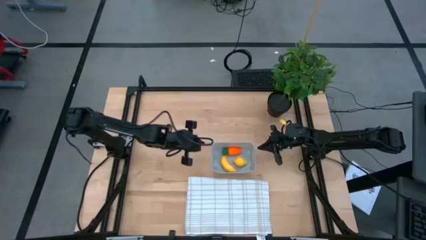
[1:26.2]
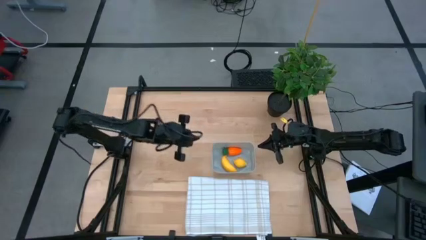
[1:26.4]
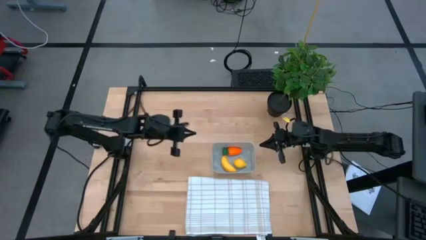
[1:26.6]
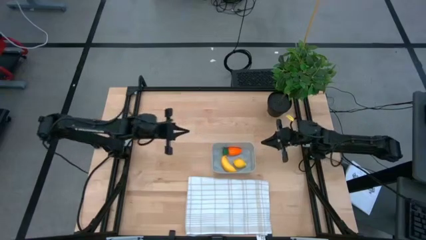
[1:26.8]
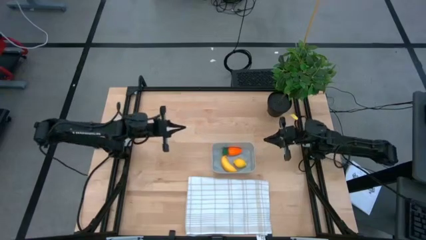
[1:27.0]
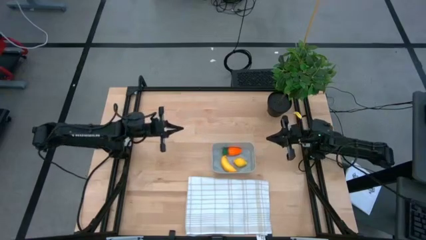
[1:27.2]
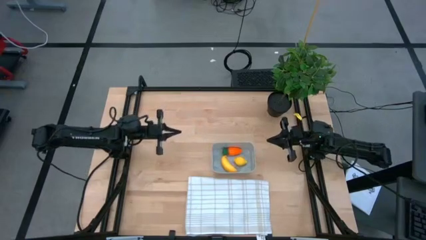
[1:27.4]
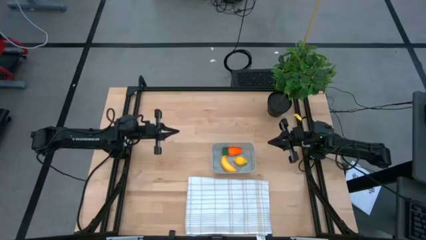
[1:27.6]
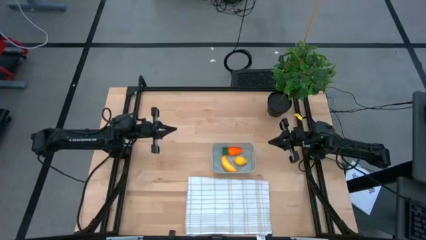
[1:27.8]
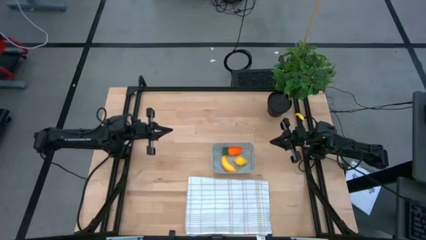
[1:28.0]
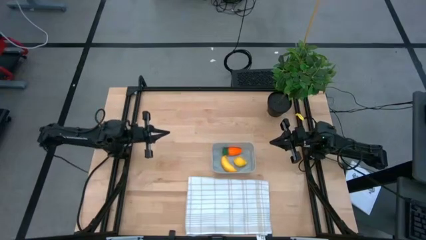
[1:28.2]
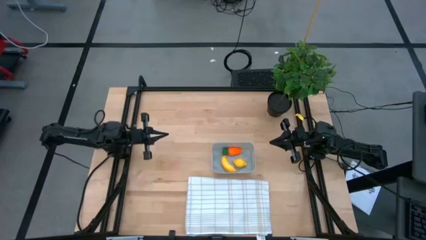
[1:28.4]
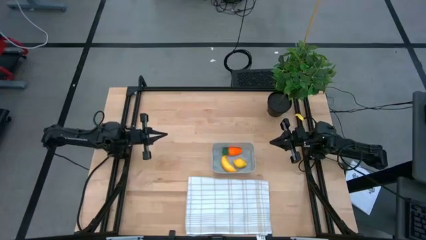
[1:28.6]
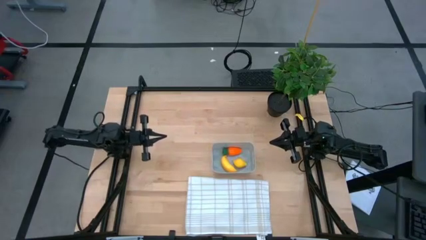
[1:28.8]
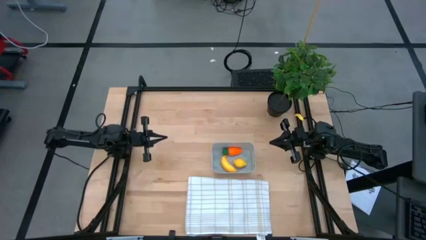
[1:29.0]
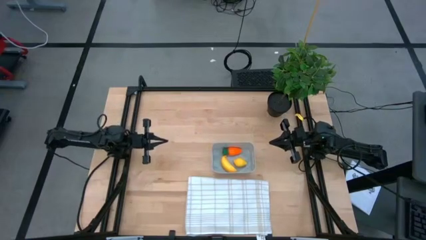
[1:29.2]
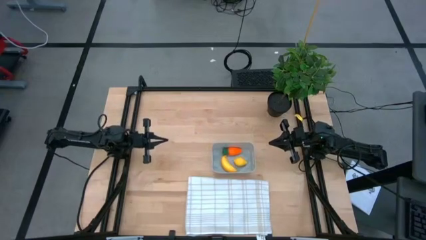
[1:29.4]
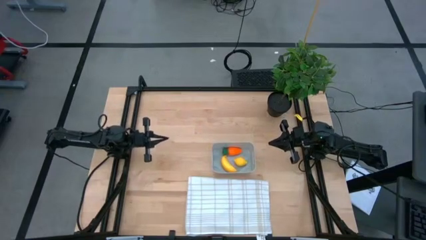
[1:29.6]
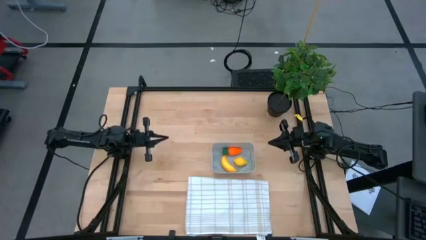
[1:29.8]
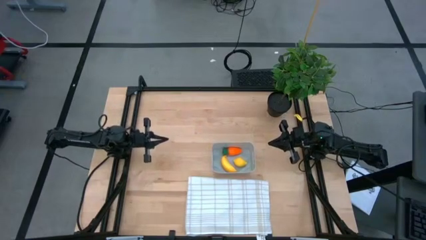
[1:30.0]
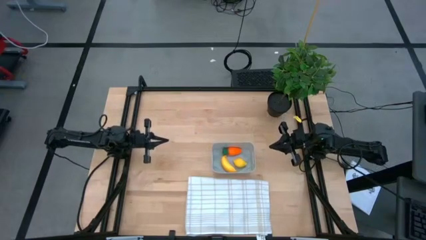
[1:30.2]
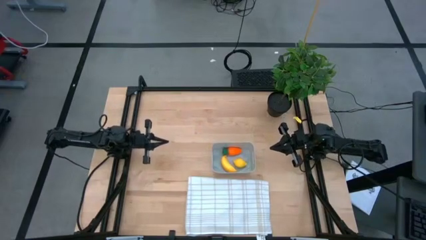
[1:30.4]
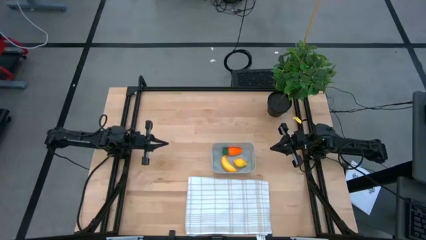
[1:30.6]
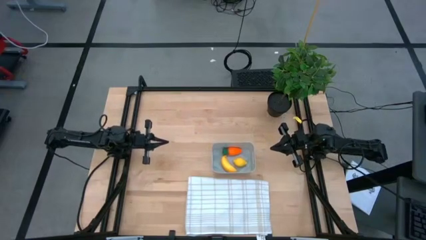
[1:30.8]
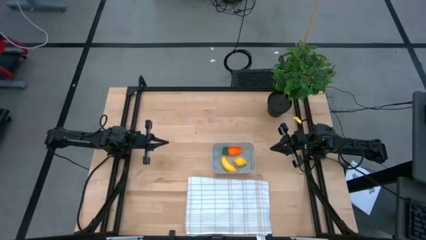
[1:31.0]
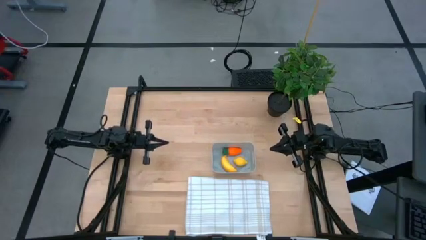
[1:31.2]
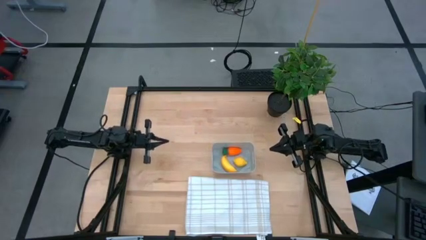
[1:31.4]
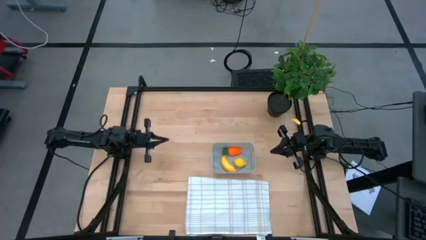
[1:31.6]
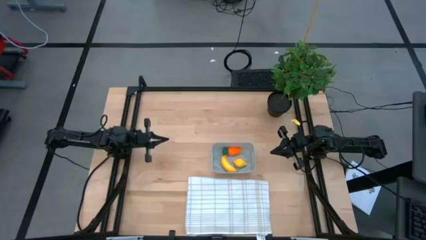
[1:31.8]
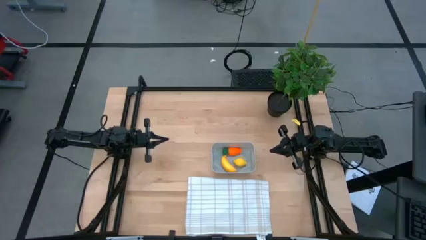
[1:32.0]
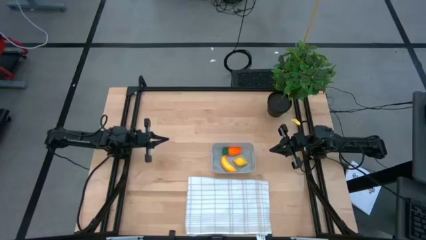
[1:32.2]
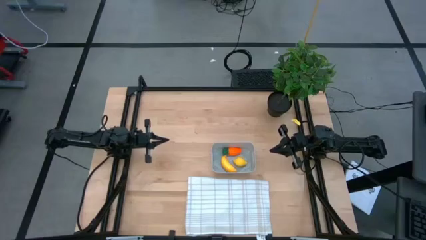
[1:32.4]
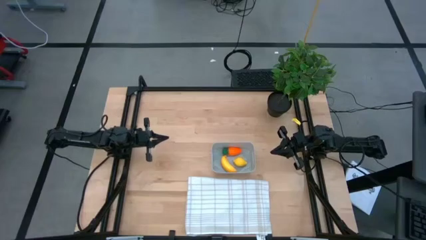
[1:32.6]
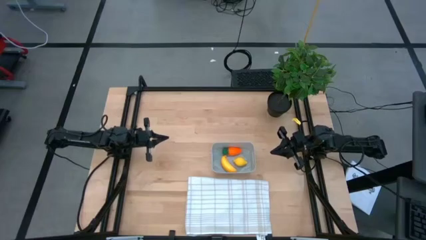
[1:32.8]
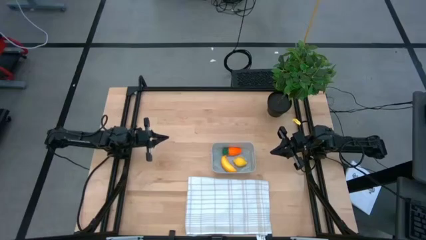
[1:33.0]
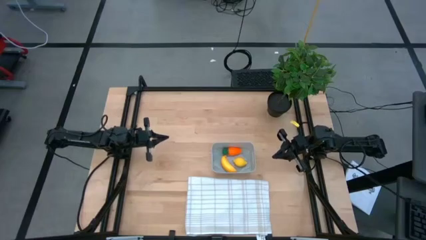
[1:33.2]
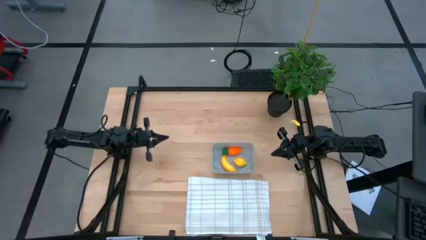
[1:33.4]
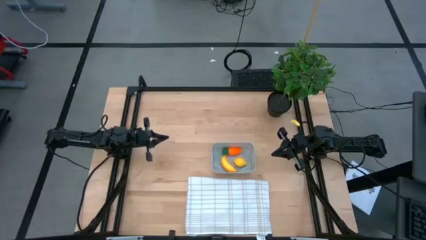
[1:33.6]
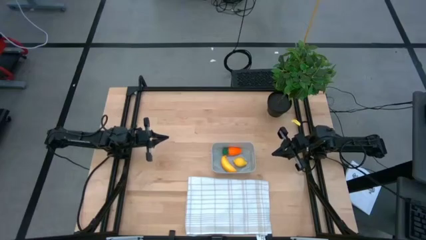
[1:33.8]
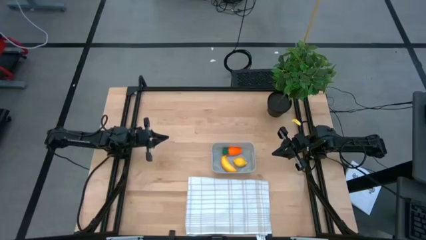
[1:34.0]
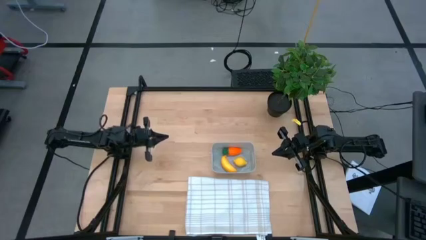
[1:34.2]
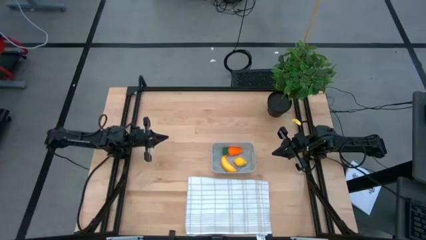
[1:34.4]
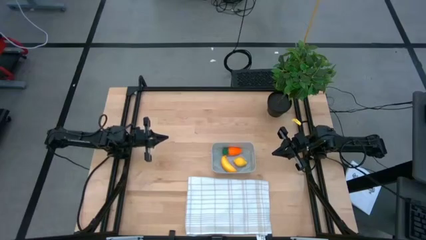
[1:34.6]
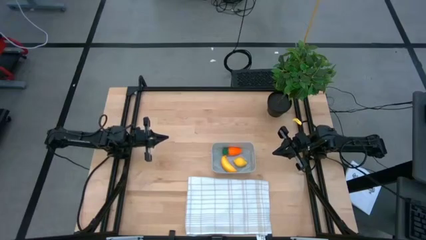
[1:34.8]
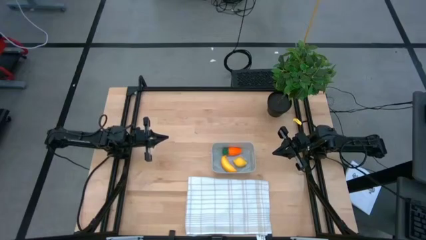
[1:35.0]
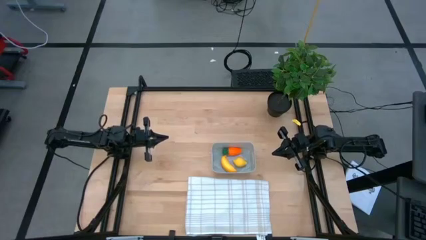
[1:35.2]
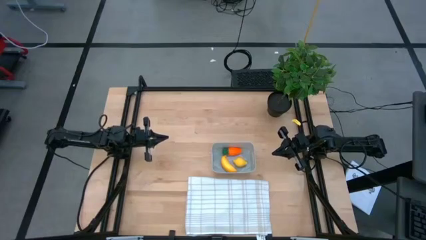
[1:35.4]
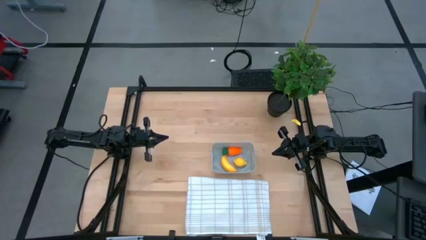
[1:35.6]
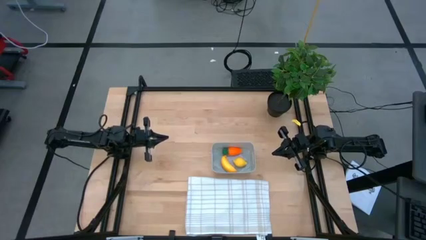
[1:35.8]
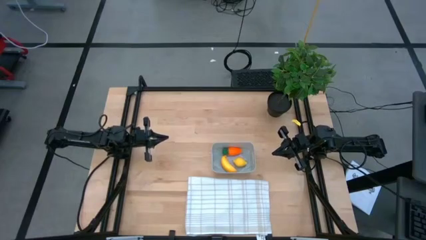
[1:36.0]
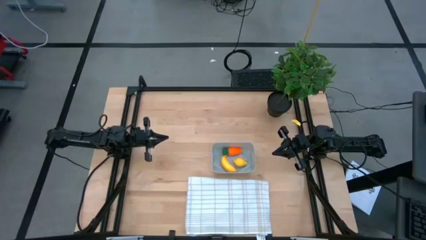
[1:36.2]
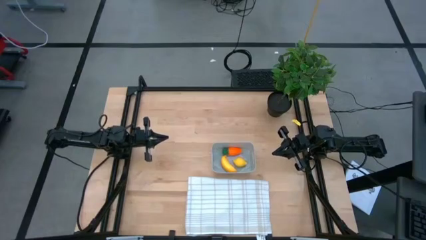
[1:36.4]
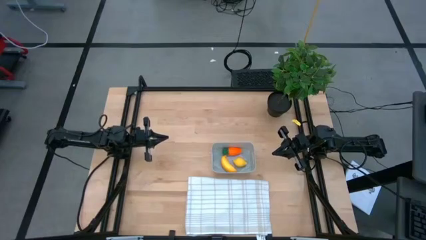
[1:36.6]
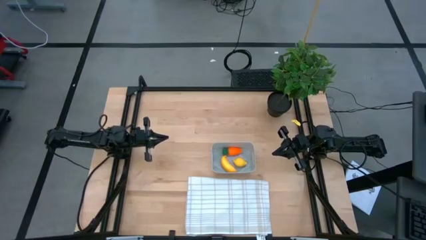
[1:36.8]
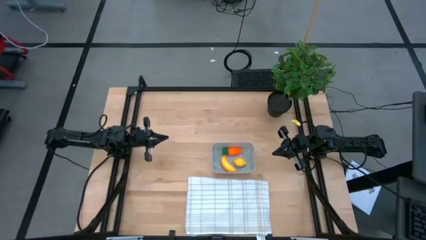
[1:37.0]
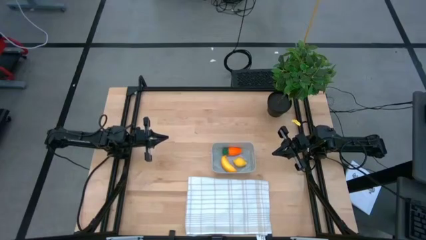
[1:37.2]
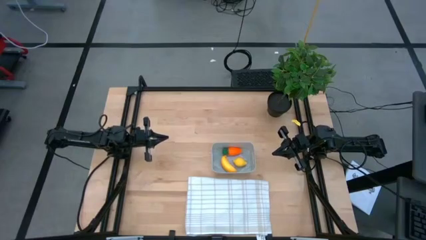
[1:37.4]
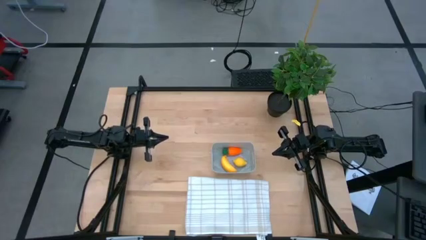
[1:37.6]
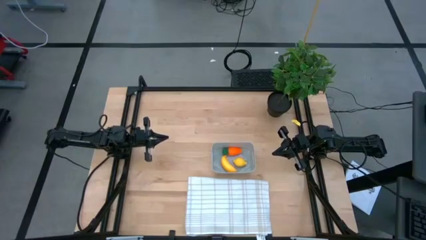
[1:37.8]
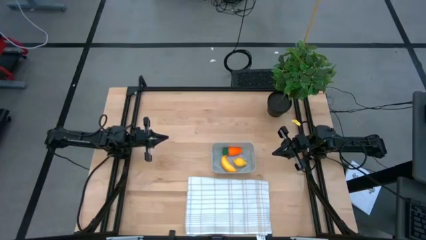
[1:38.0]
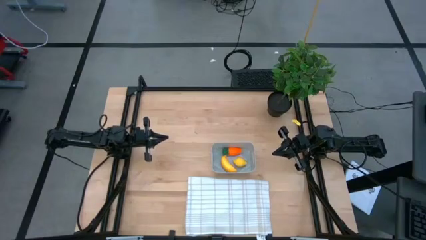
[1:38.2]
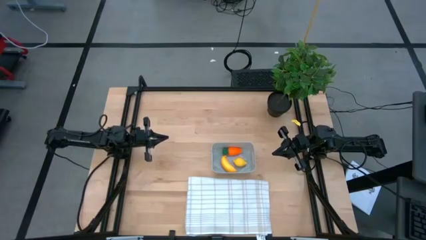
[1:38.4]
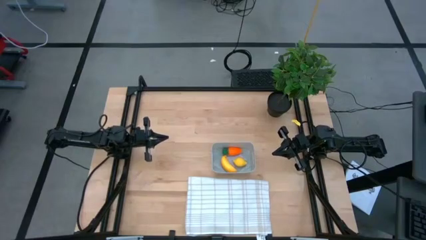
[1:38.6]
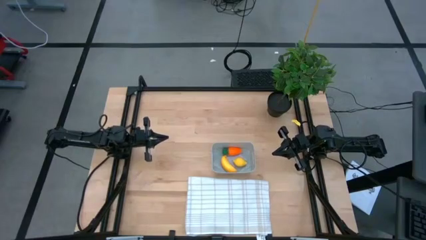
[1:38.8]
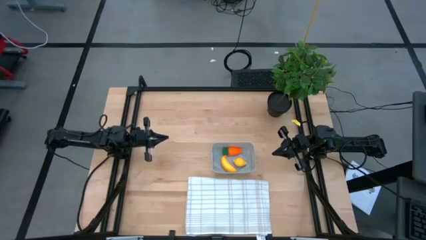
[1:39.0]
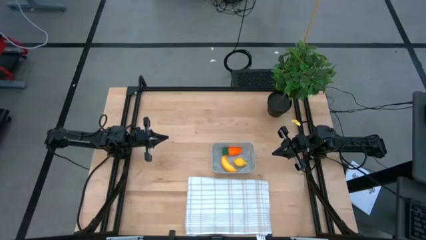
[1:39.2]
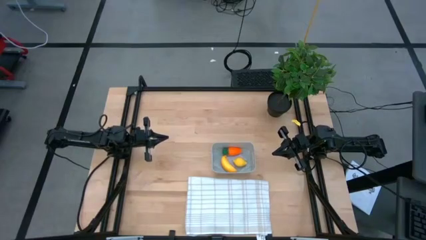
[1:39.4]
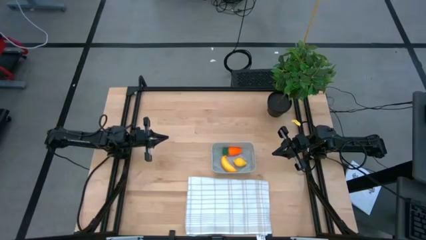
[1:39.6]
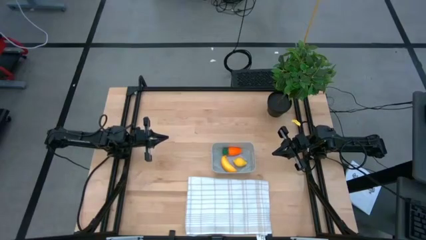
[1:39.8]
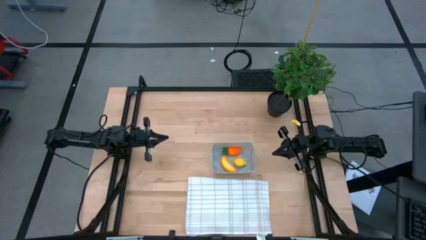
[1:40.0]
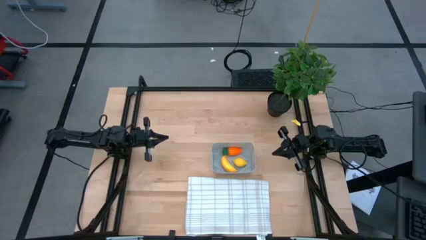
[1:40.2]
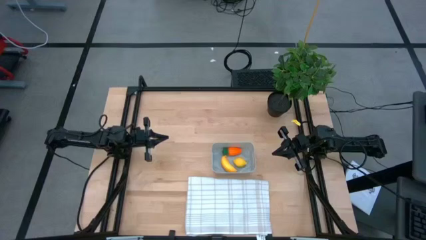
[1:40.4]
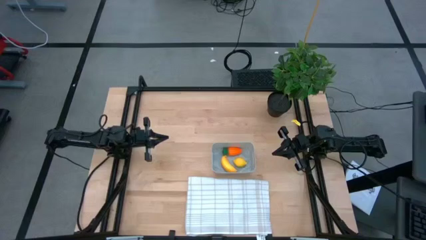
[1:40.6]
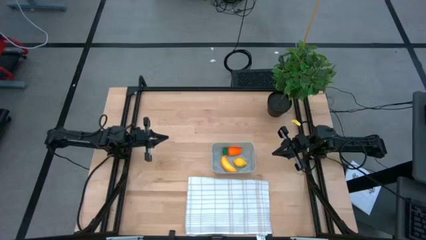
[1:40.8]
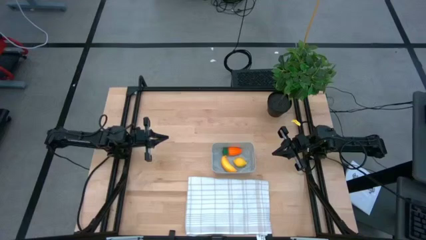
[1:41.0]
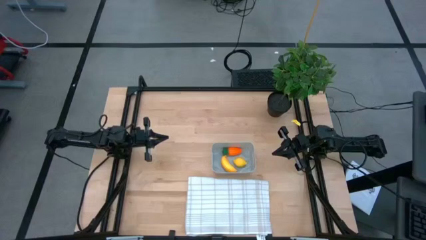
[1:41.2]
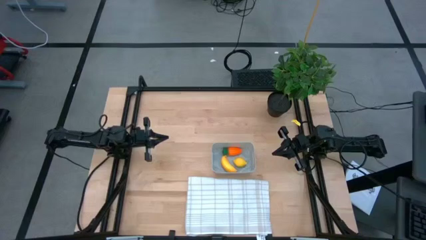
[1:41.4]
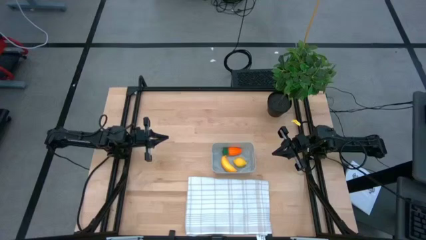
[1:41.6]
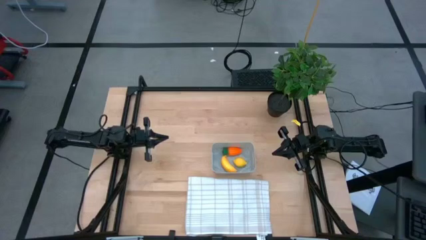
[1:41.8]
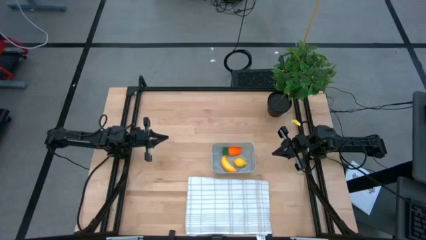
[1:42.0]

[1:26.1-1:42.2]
Task: Pick and placing Produce into tupperware
Return to Home Position
